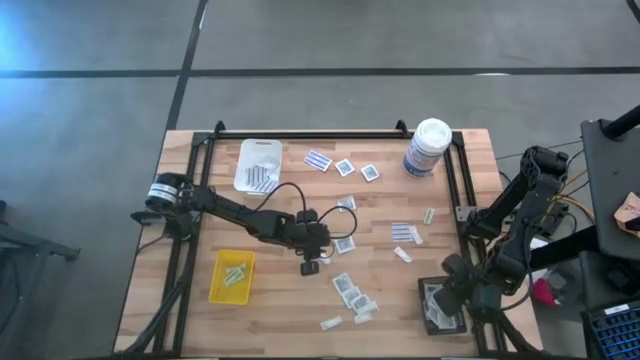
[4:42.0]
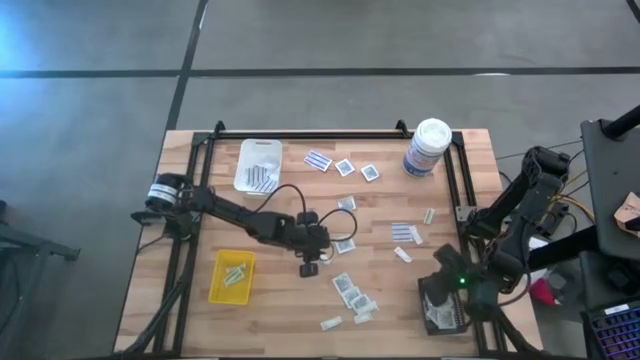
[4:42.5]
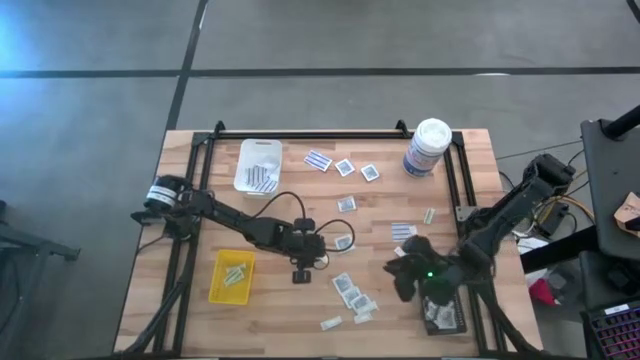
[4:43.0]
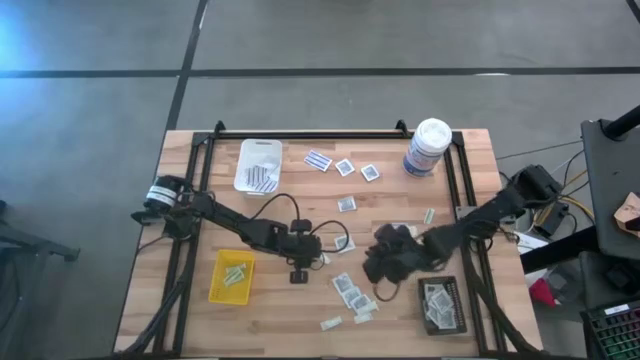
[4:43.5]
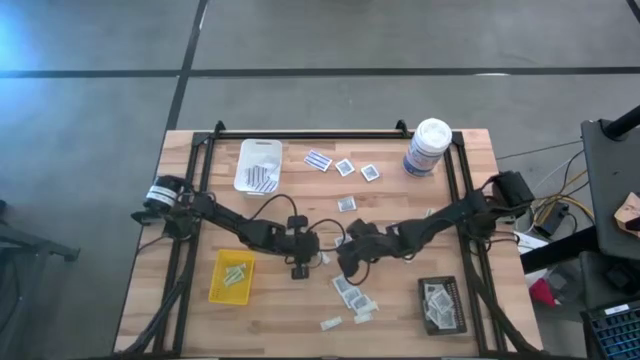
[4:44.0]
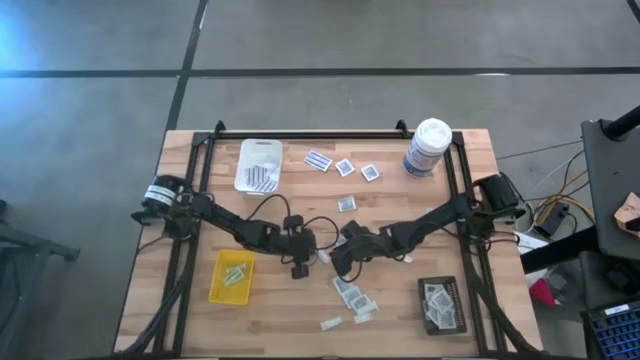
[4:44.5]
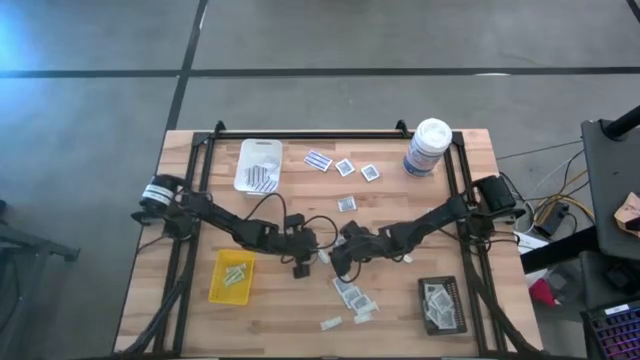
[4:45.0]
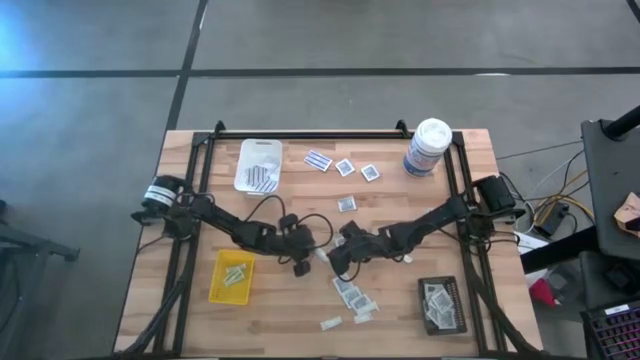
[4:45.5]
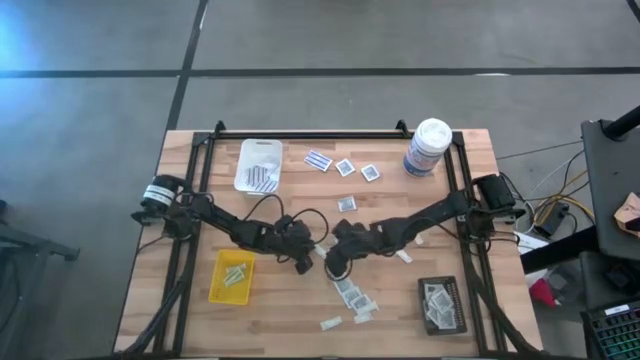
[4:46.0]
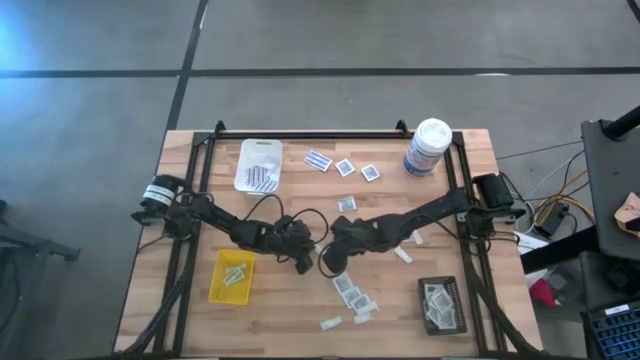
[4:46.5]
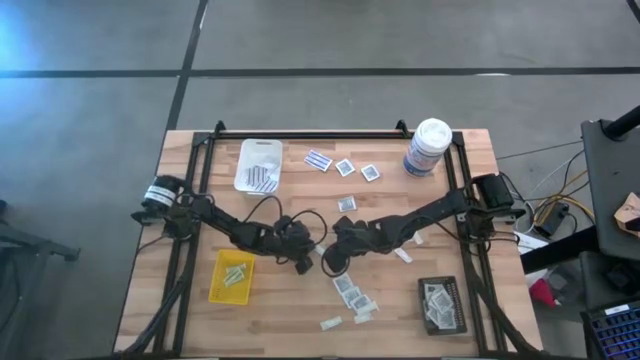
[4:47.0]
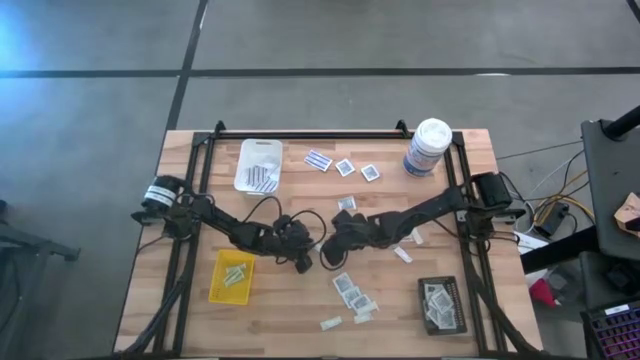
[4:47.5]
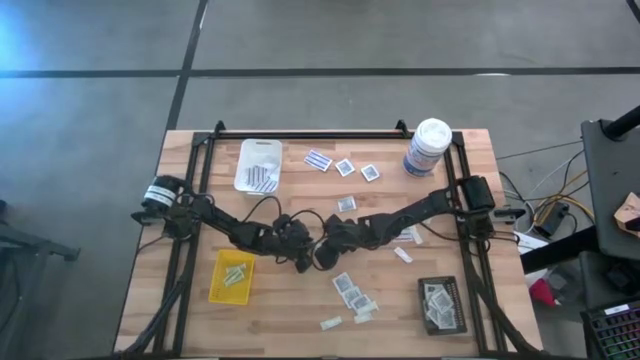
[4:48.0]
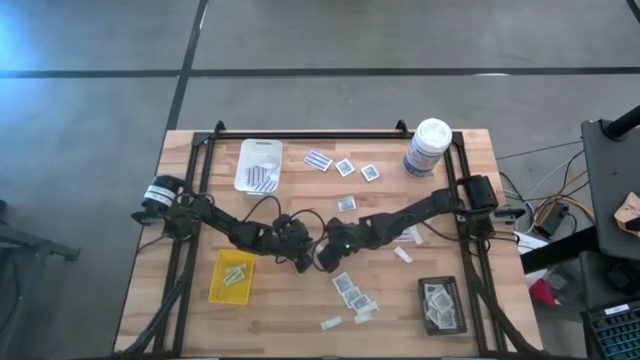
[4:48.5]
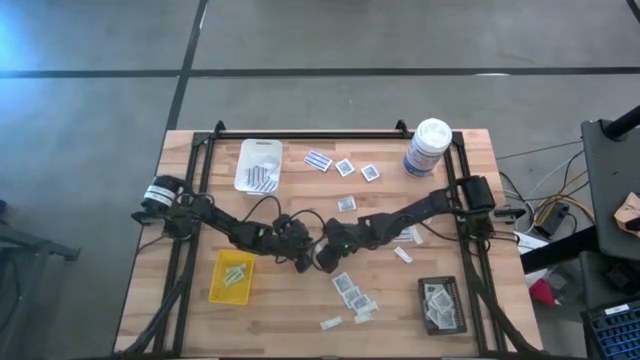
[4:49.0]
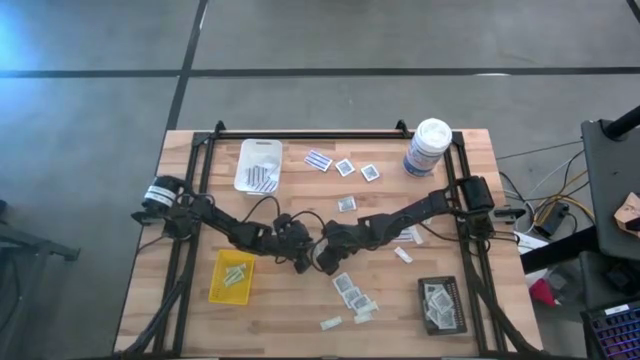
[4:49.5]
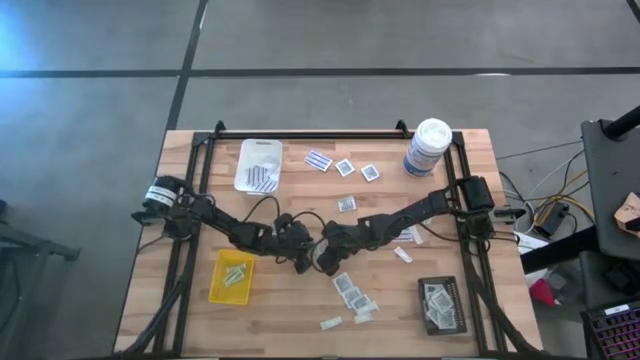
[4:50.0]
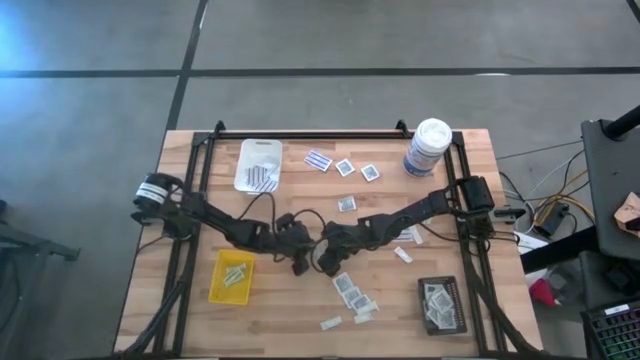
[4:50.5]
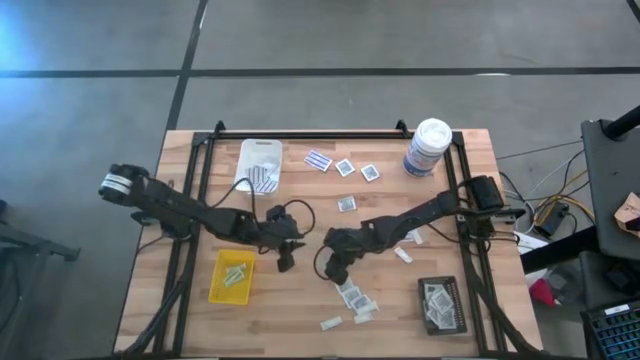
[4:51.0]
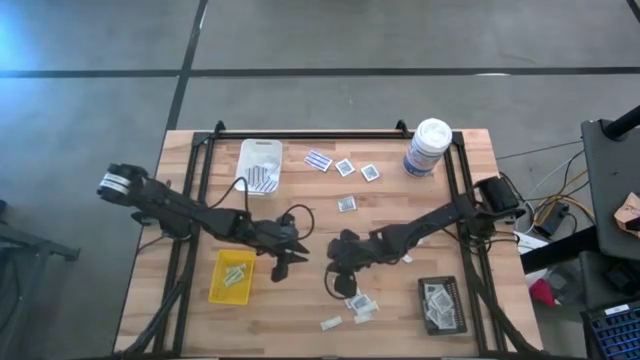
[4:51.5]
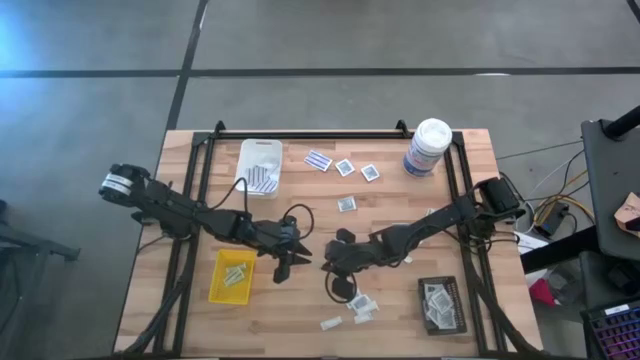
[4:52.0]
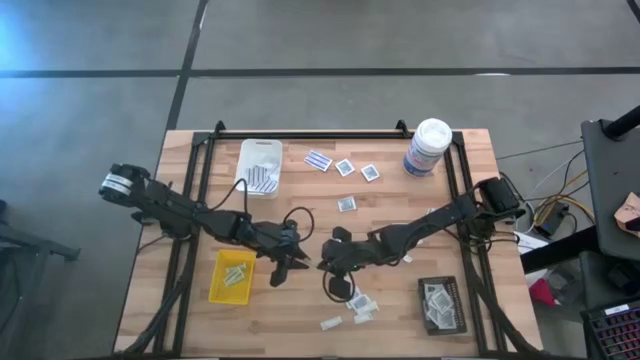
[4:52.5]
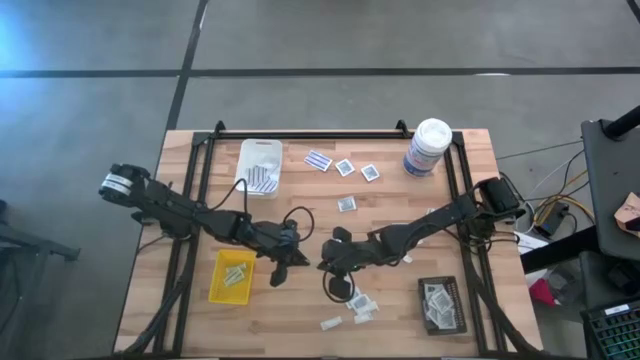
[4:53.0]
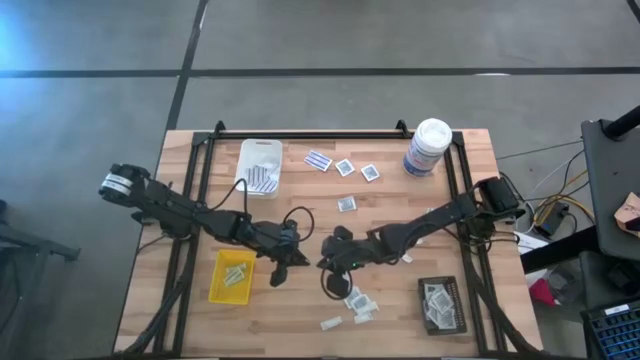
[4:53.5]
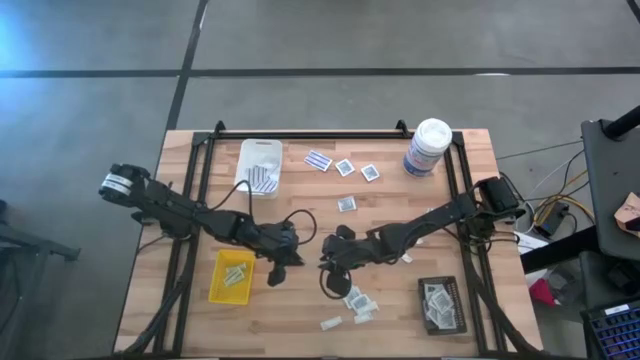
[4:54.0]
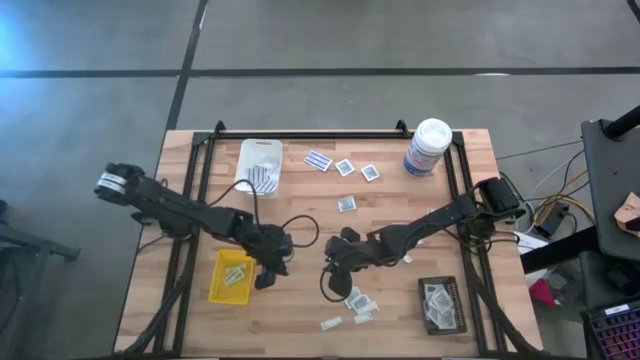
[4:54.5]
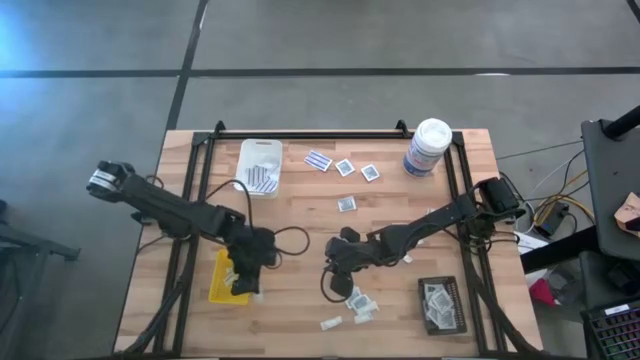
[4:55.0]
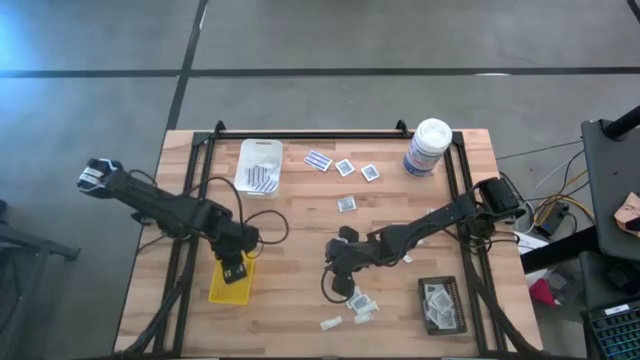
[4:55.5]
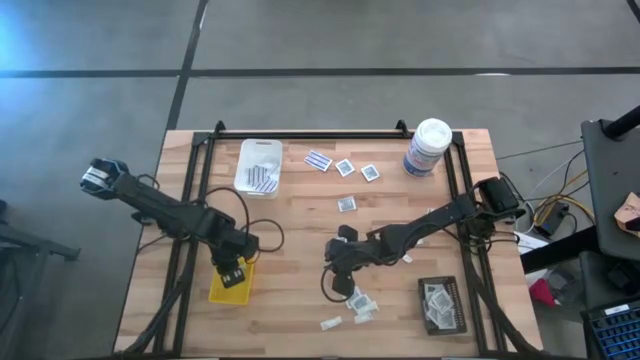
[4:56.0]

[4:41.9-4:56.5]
Task: Pick & Place First Aid Supplies
Put the green bandage into the yellow bin

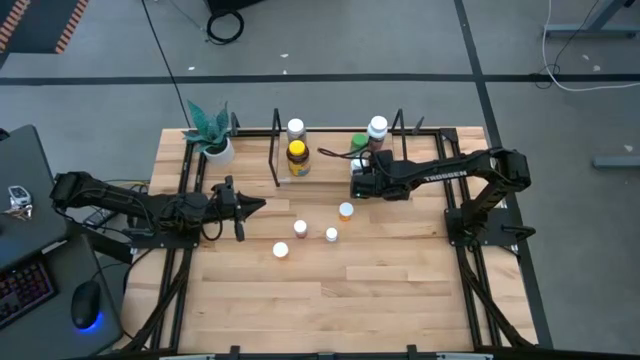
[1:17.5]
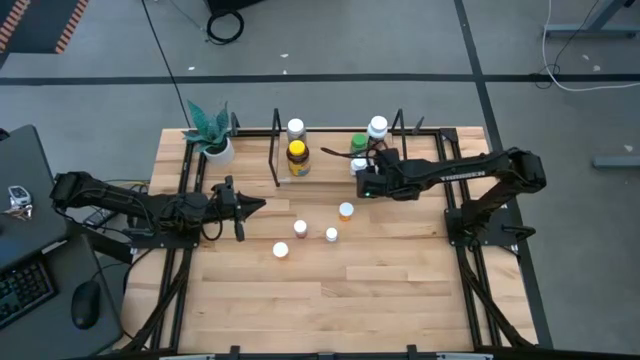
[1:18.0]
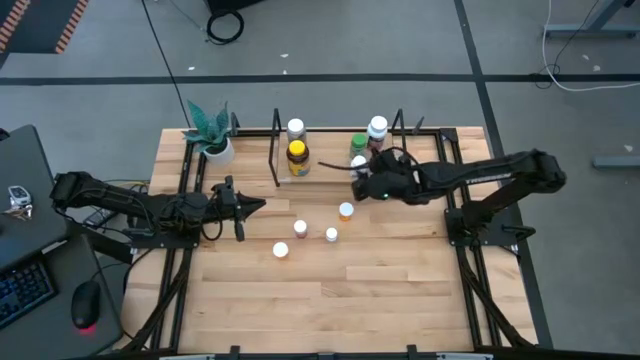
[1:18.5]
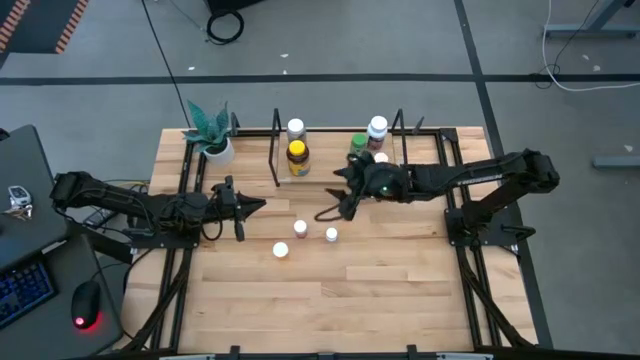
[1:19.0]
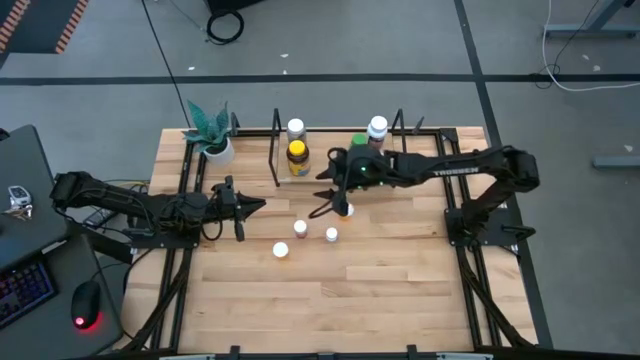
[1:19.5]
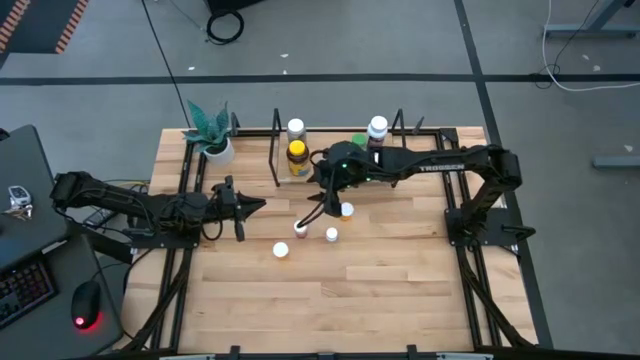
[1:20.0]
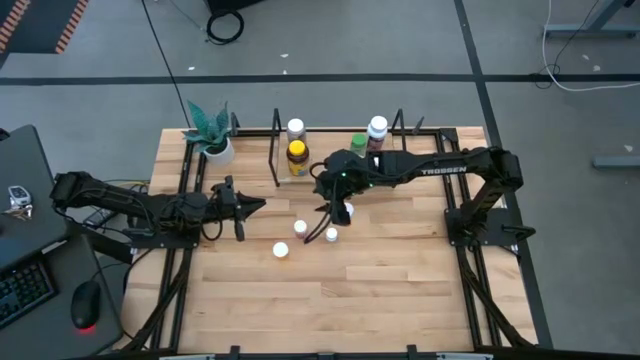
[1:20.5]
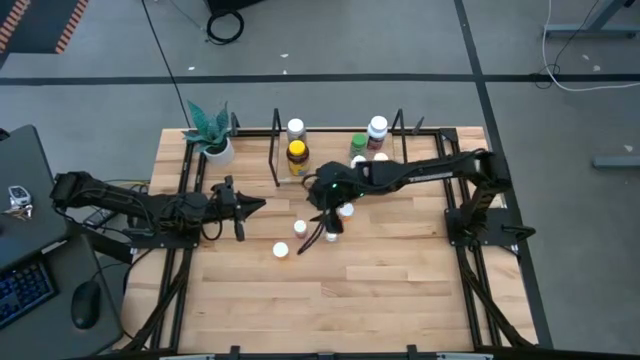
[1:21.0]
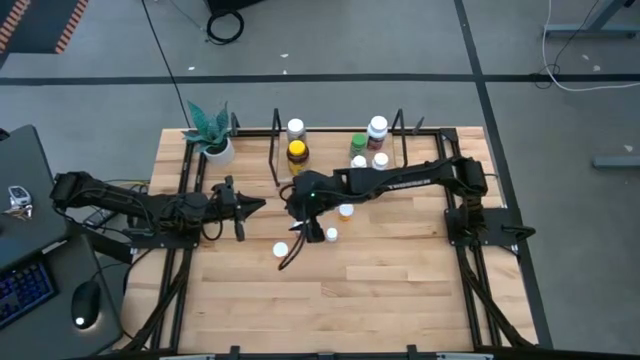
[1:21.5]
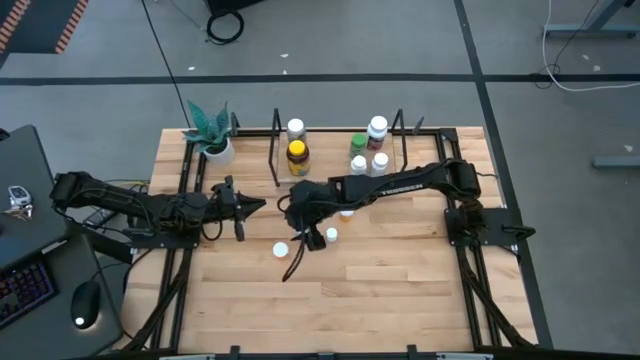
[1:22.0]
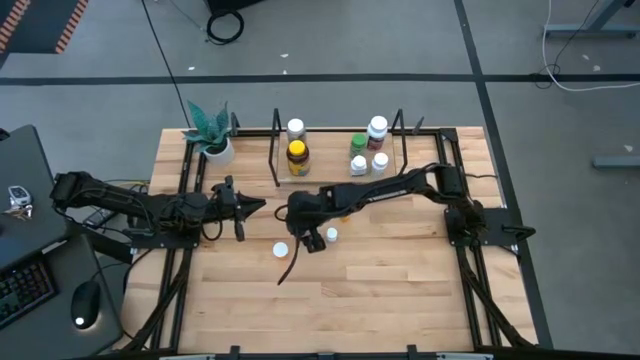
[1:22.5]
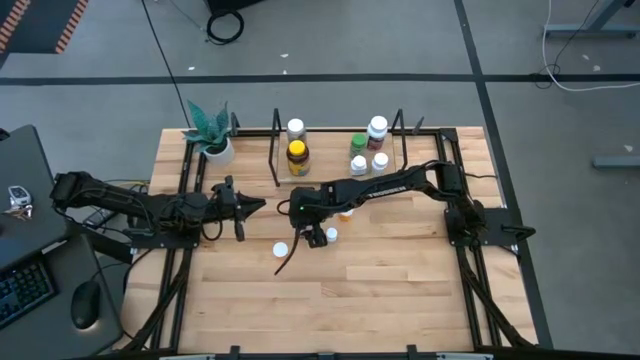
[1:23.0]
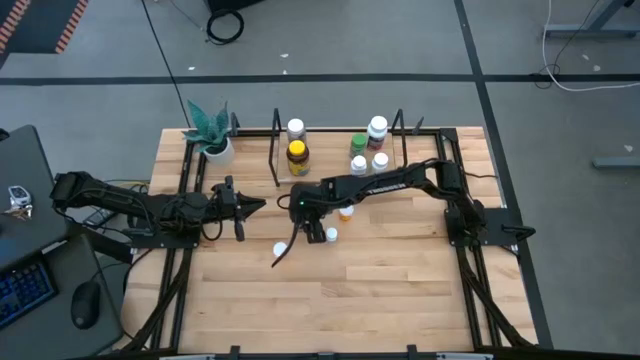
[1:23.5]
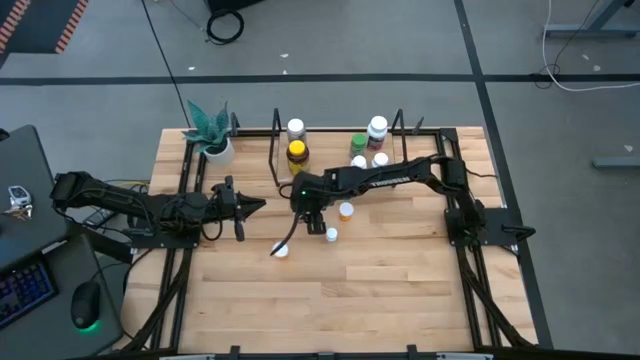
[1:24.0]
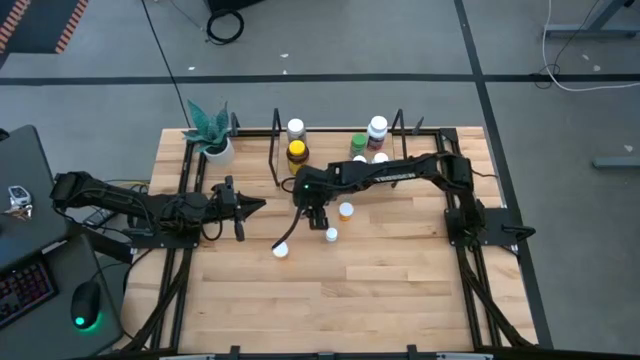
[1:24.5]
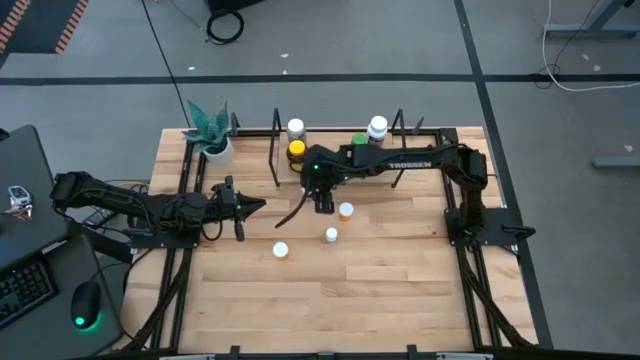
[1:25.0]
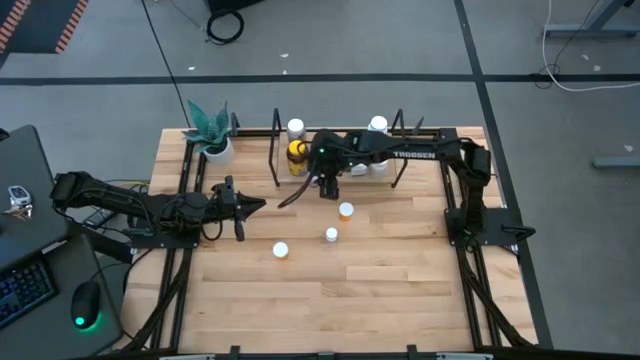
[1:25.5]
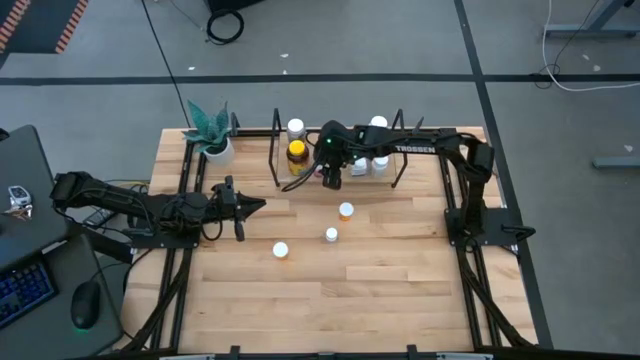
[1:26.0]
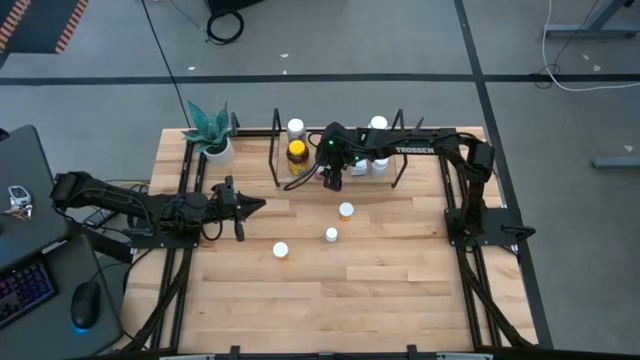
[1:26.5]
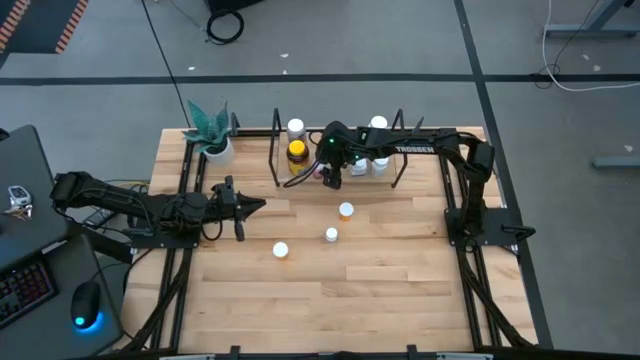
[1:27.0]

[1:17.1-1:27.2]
Task: Pick and place medicine bottles onto shelf by color
Put the pink medicine bottle on the shelf
